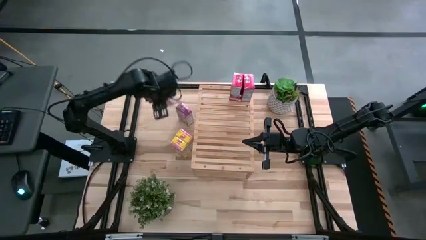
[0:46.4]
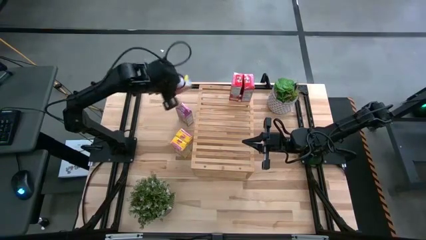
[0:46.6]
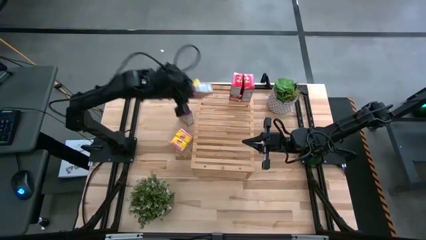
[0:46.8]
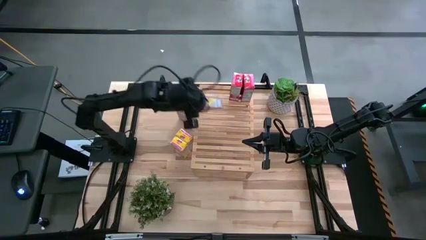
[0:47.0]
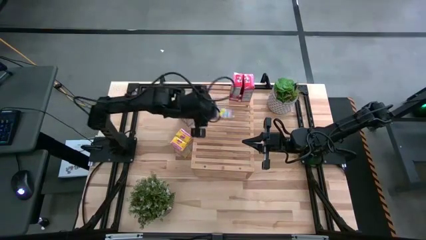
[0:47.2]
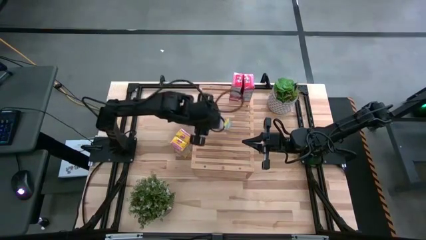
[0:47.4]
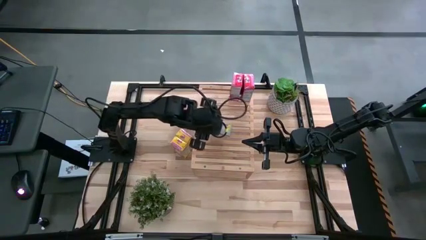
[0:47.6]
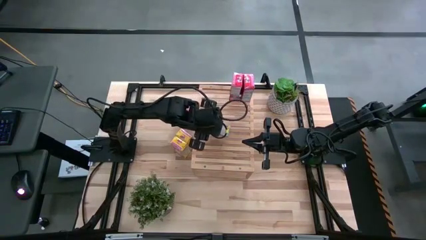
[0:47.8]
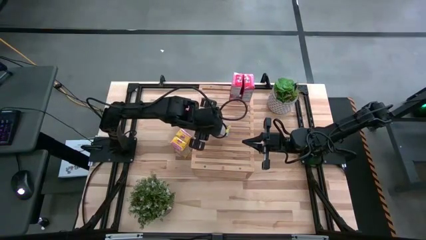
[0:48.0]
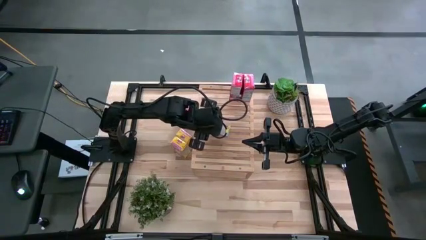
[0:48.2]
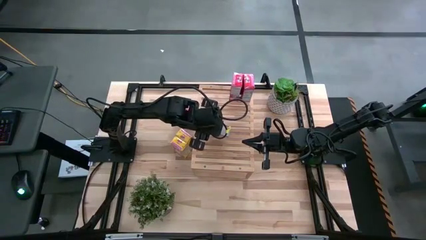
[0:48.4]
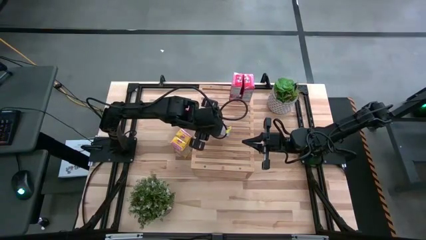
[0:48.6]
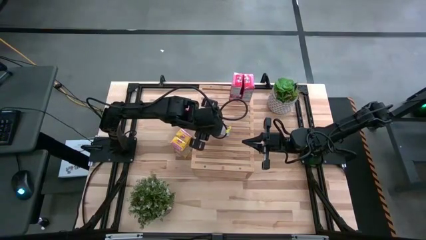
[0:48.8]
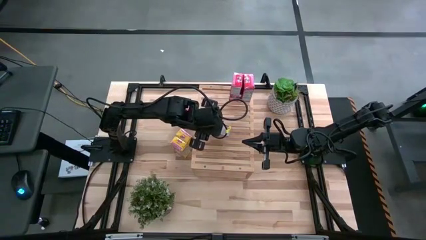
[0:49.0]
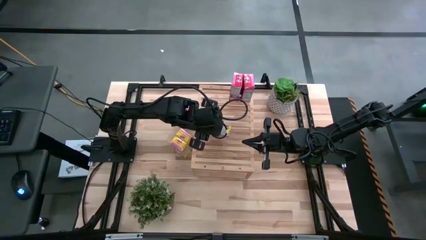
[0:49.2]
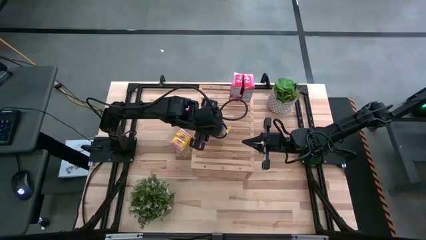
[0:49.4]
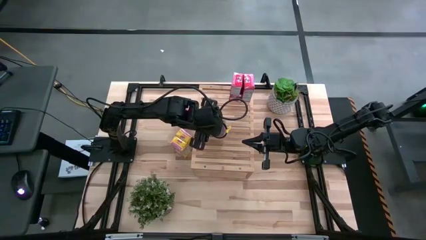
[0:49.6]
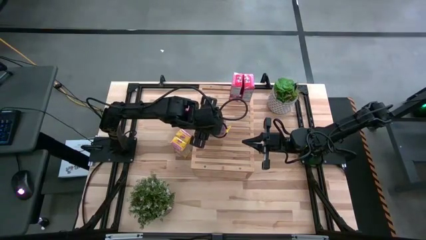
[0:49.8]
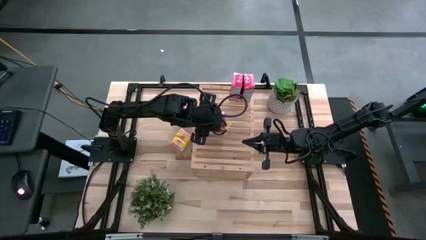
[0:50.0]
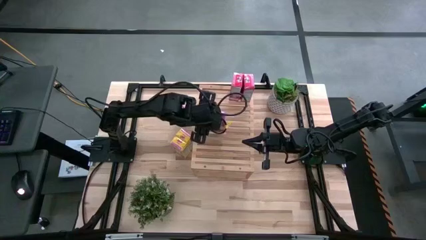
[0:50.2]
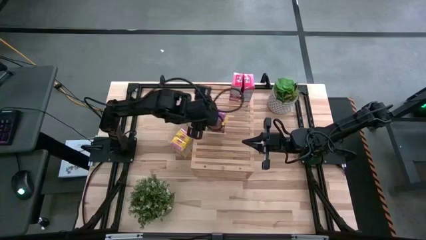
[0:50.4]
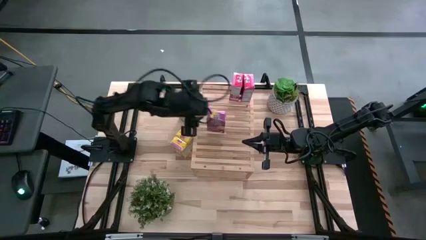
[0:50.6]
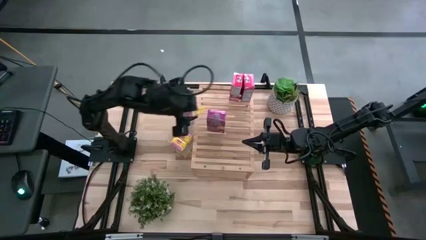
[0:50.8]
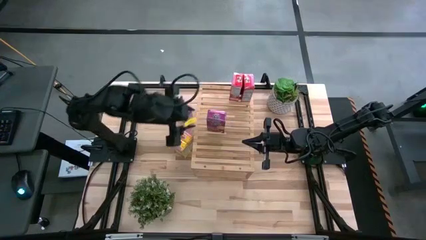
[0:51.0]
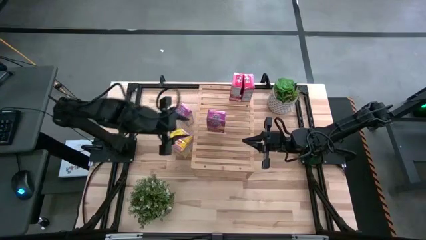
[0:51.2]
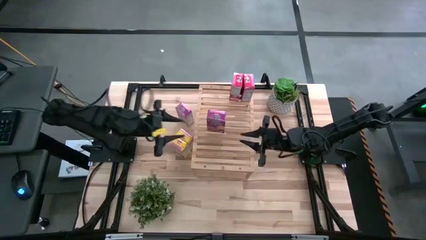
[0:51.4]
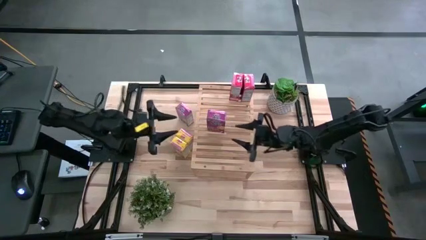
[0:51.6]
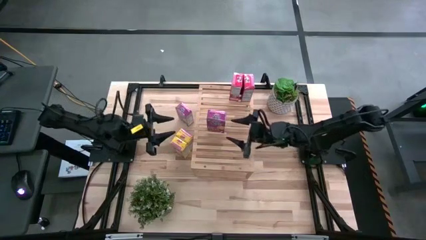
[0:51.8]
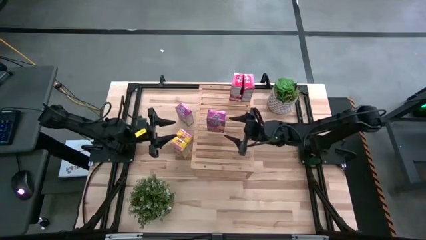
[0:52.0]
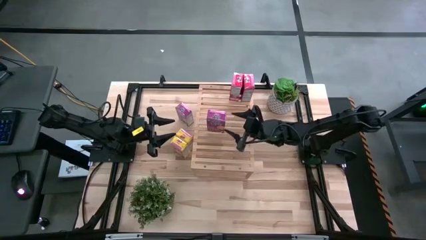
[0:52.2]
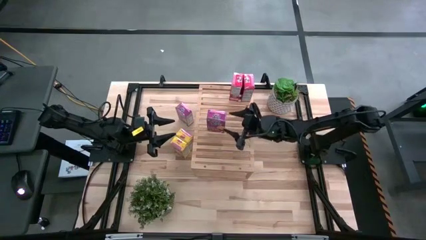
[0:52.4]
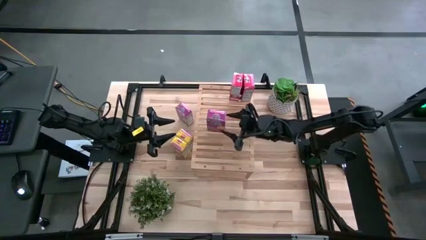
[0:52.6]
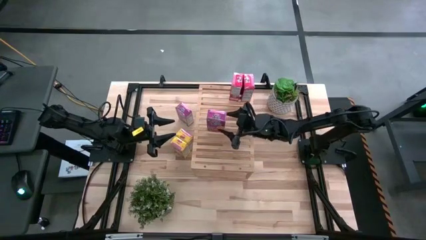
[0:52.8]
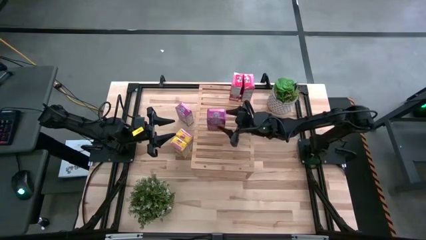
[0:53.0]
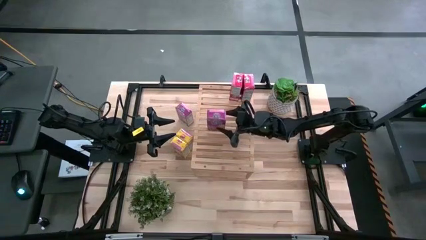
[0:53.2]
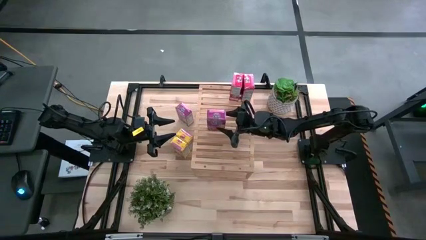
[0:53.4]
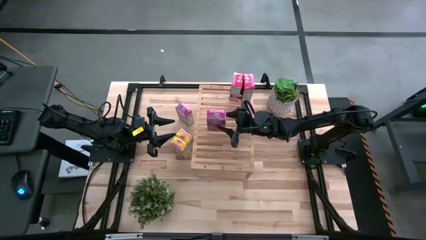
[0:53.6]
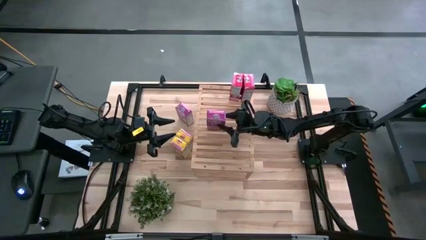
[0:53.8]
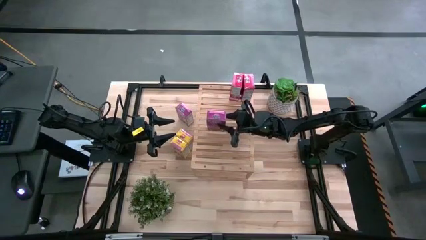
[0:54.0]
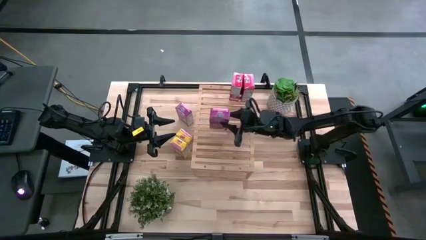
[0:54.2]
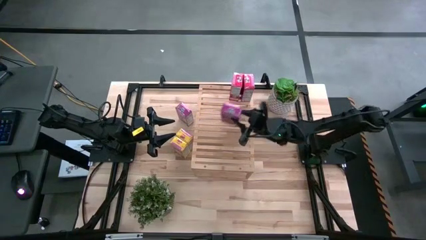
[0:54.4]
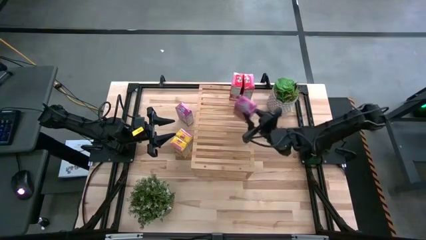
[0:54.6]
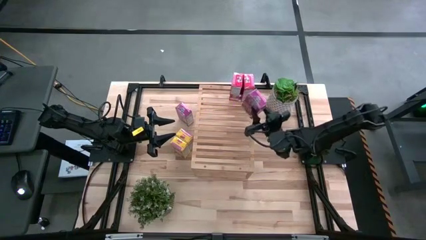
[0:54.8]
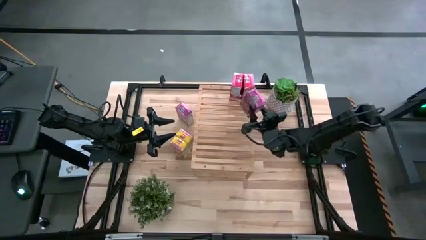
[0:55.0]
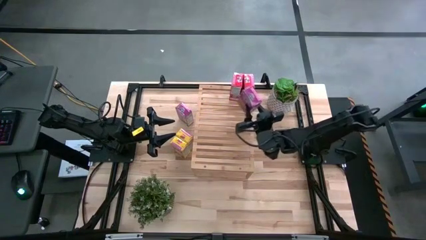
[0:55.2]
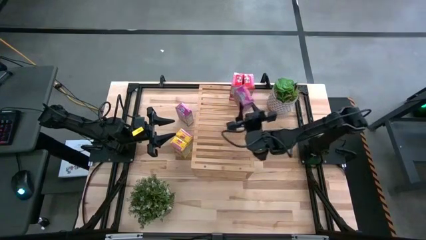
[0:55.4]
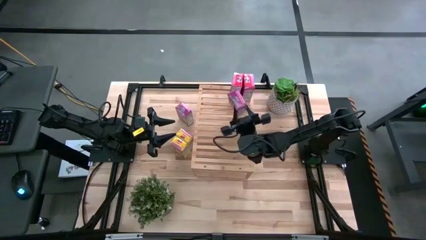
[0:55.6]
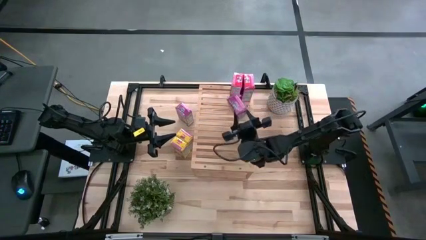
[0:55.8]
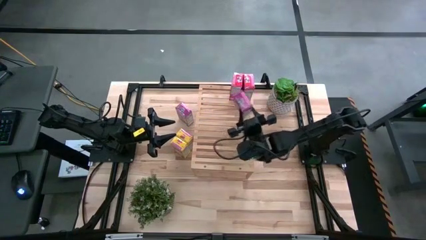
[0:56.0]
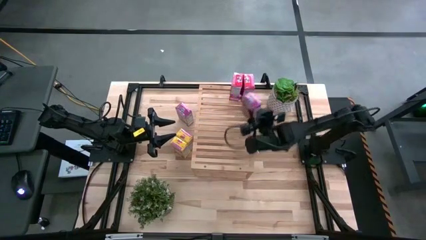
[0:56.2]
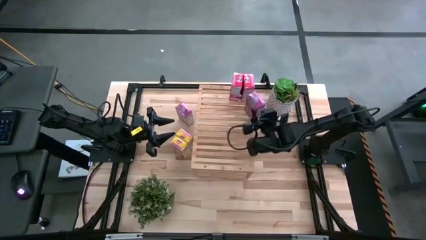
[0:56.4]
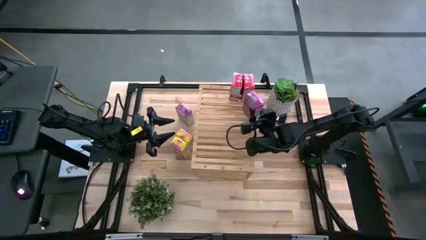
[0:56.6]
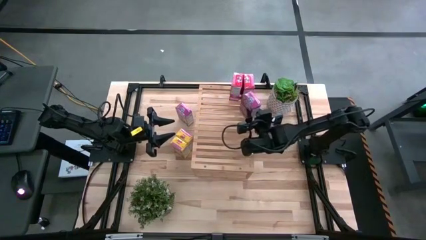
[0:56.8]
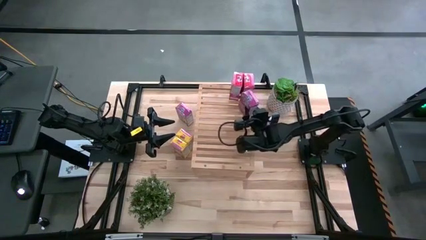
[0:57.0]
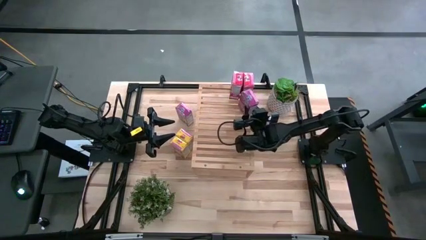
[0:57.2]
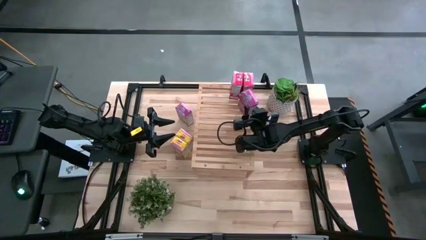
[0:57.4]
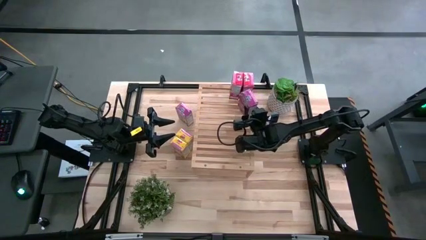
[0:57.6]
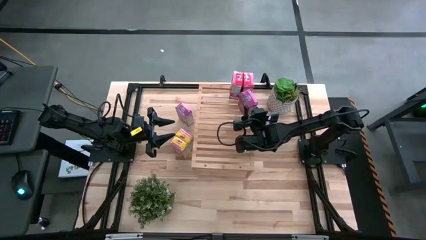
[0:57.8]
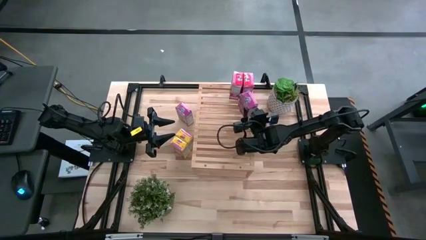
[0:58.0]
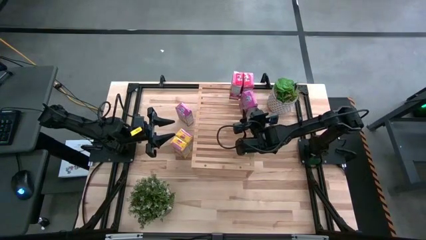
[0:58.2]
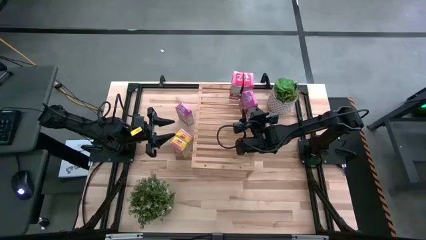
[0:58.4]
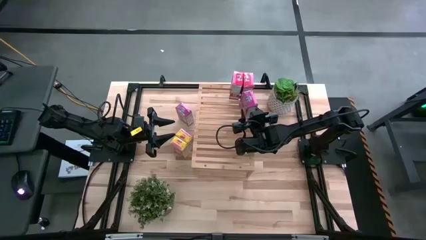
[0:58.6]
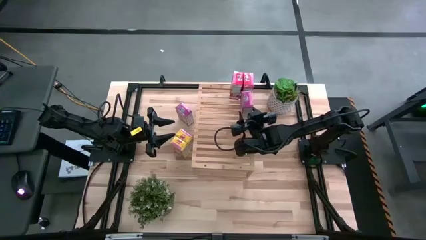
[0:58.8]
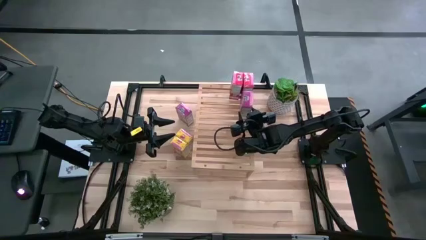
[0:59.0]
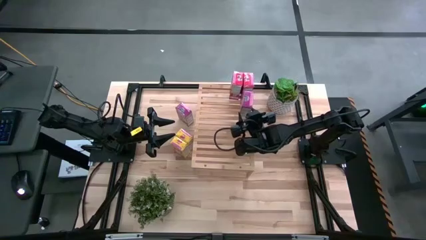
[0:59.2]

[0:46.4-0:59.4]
Task: Stack cereal on shelf
Put the bottom purple cereal box on the shelf

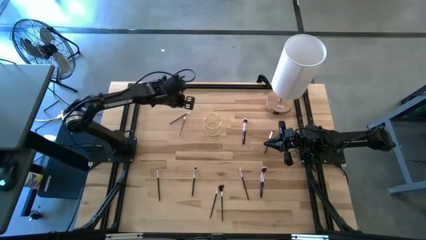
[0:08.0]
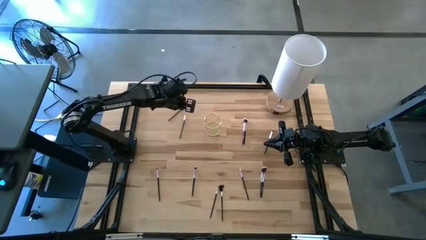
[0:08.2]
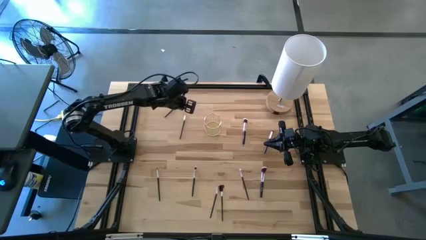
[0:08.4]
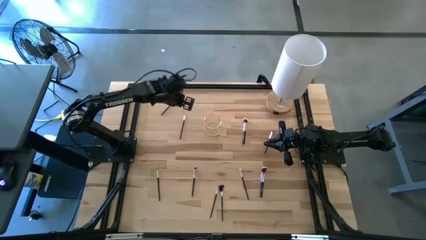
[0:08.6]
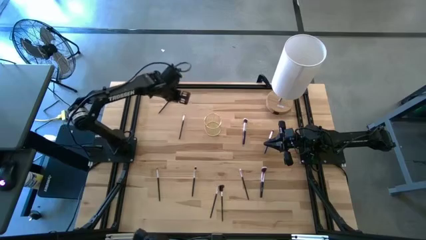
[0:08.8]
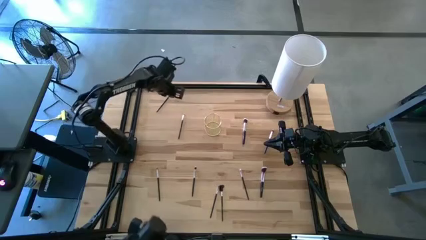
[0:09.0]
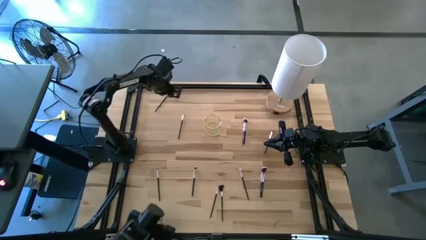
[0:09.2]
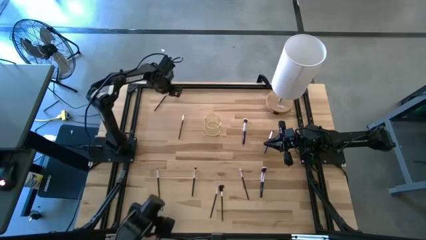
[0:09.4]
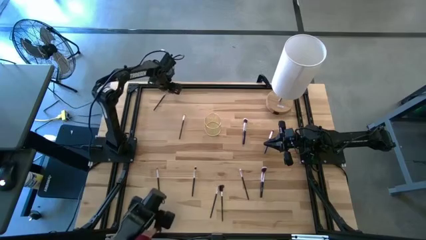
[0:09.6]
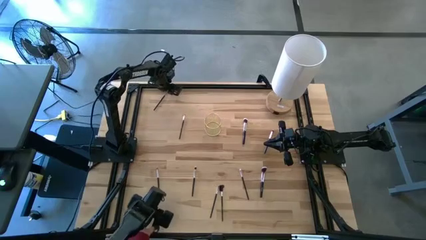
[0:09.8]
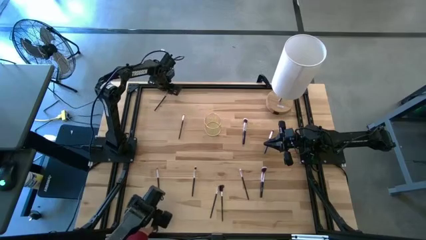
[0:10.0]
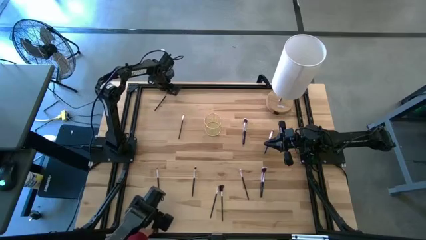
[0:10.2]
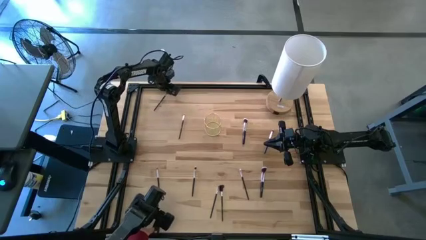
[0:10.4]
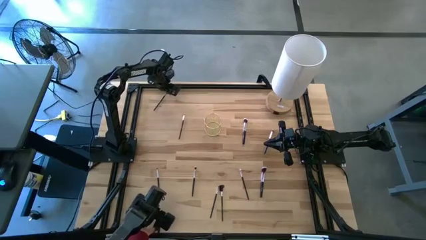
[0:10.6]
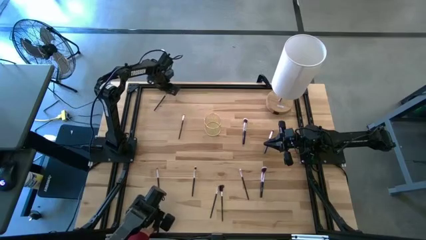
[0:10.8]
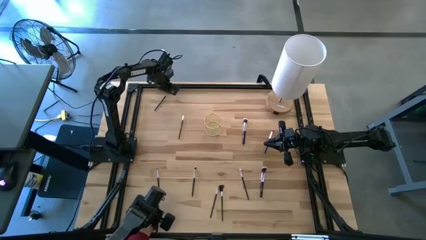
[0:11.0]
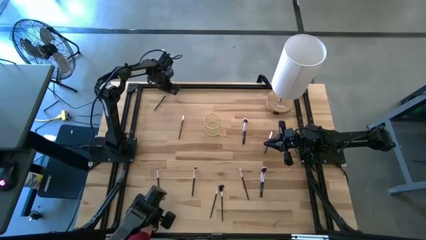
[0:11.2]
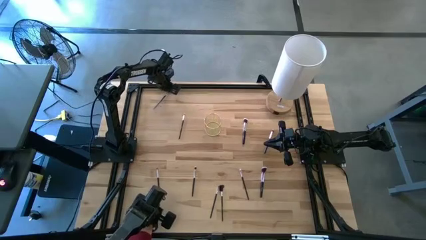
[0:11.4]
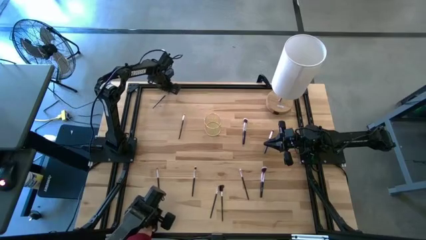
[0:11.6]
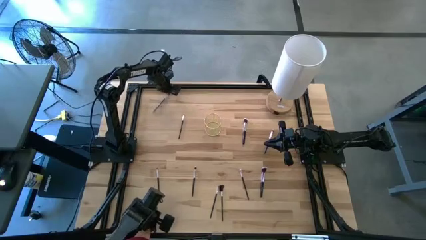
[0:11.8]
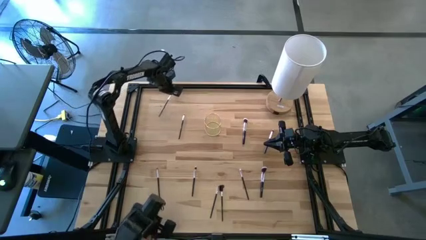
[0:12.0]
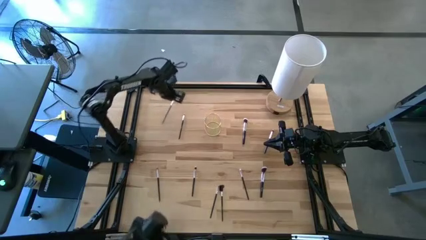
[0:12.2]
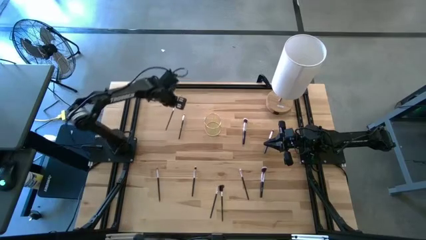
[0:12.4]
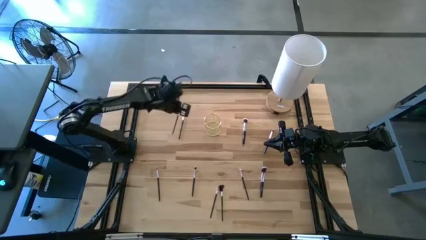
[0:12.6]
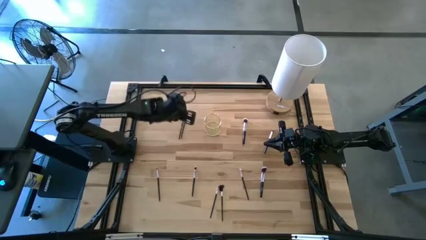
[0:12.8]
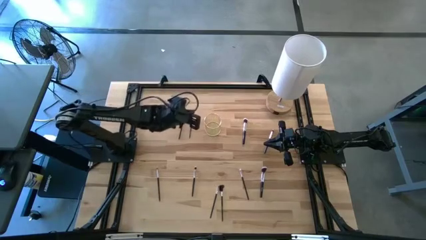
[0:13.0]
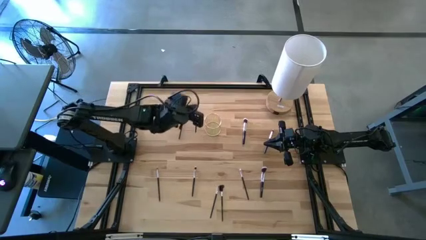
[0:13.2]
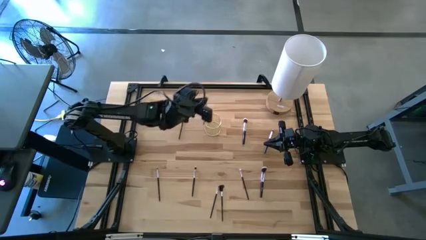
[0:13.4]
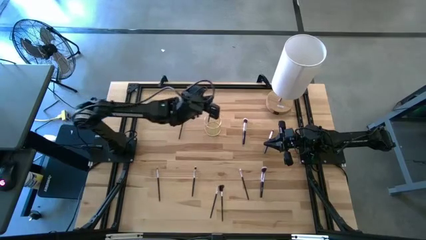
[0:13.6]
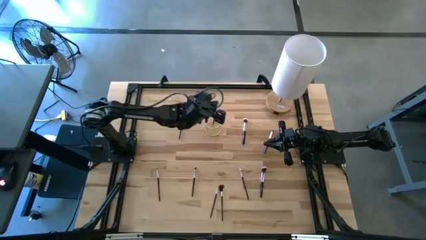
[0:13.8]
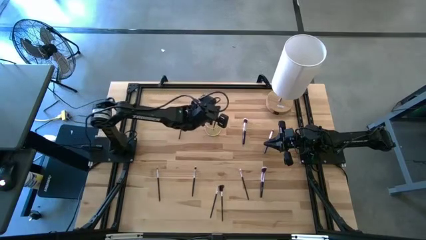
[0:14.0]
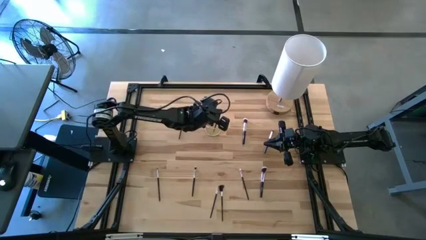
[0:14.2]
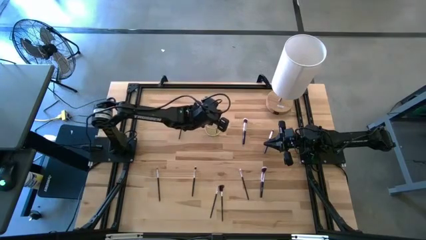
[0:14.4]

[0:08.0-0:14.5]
Task: Put items in baskets/containers
Put the black eyeshadow brush into the gold container
